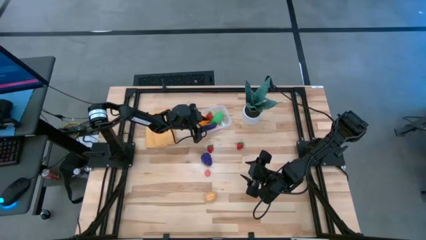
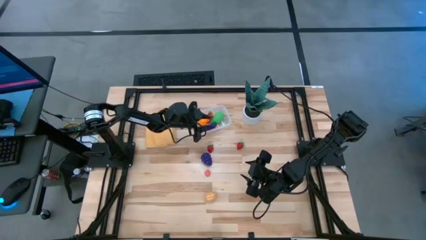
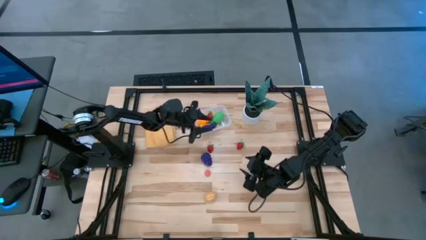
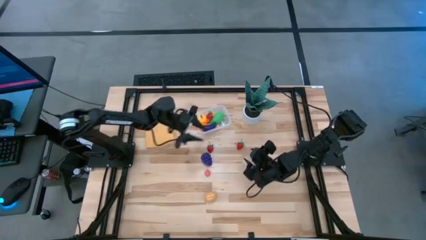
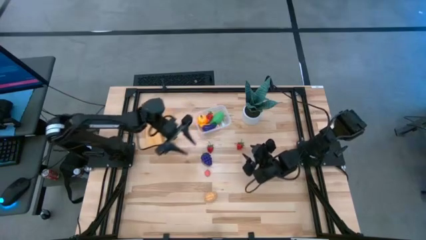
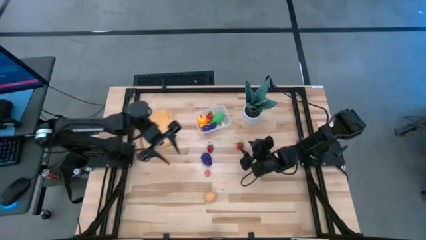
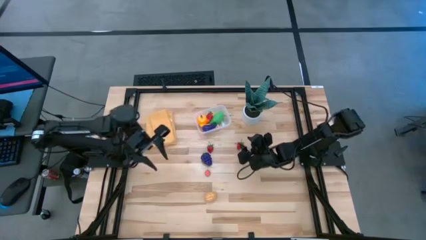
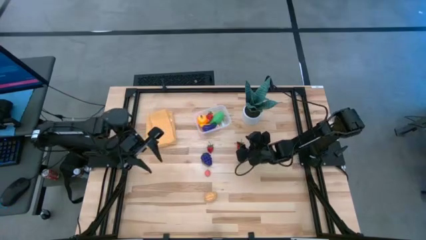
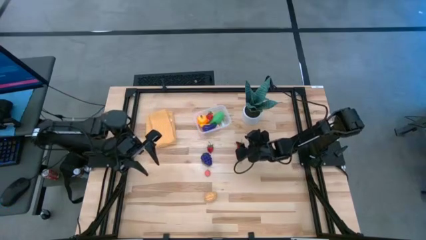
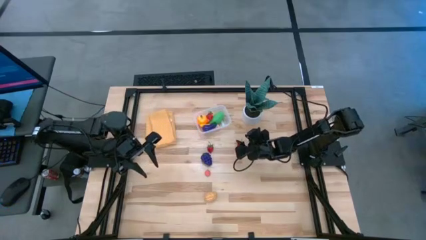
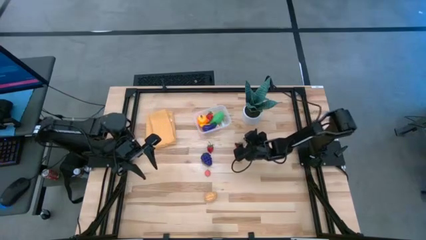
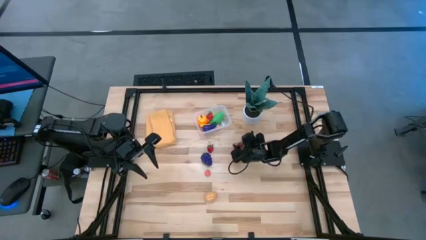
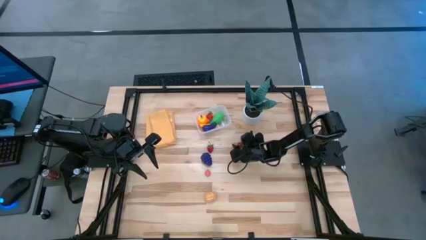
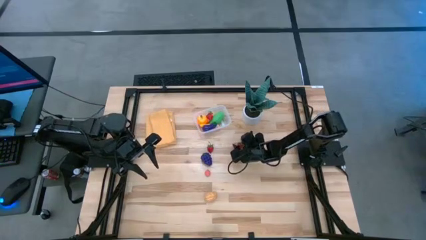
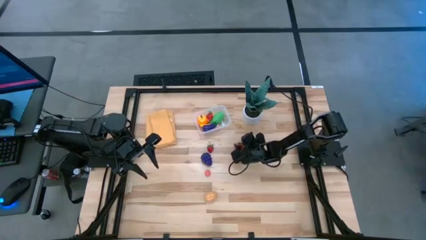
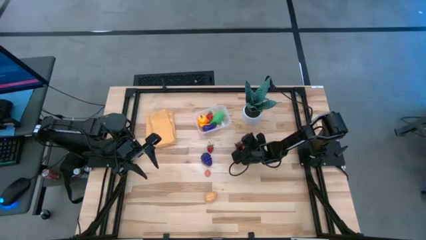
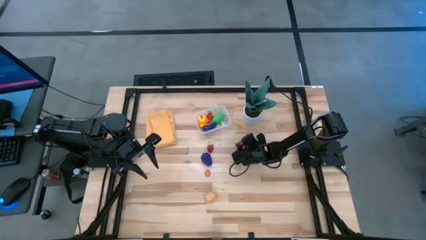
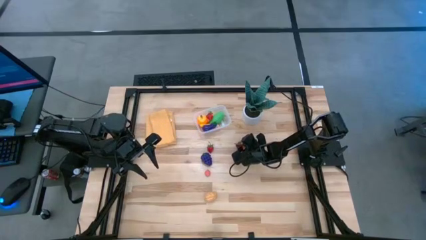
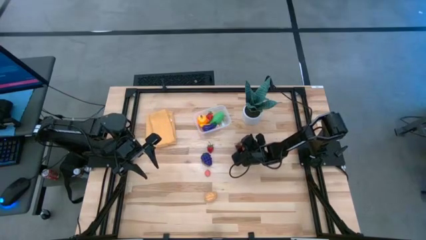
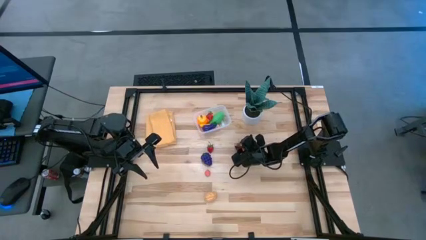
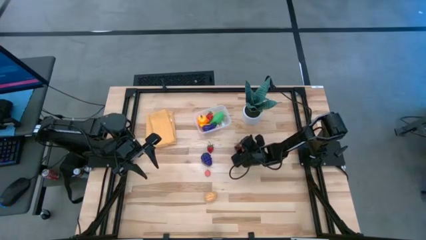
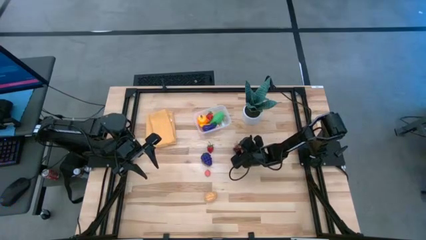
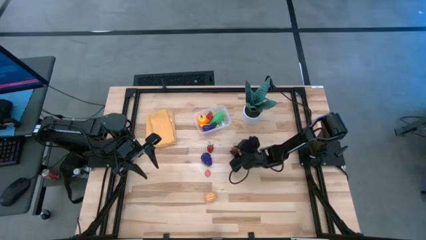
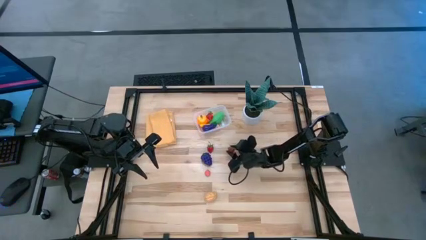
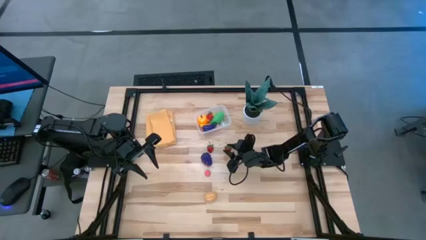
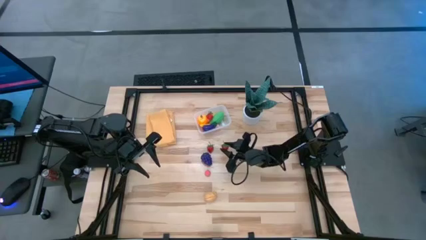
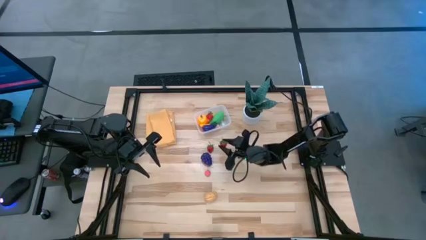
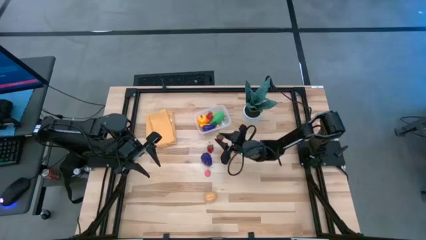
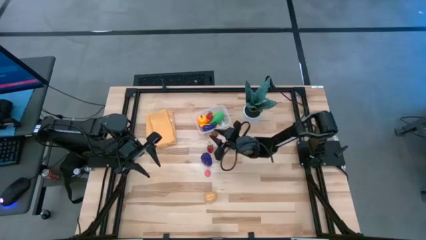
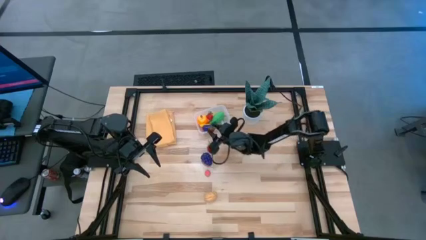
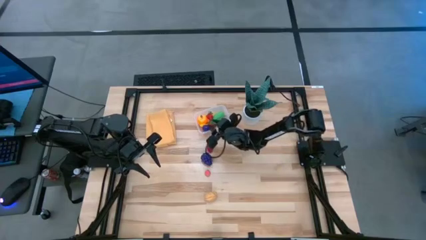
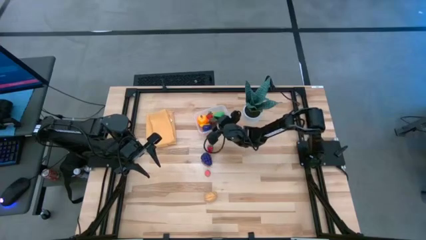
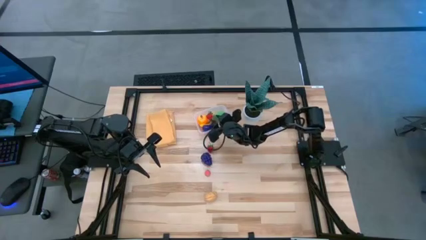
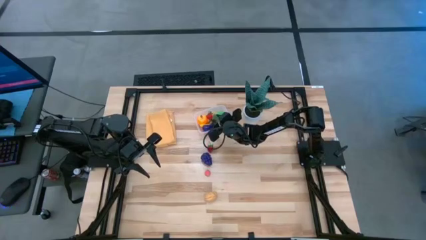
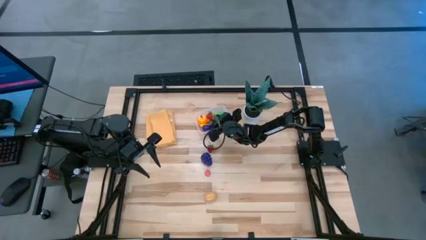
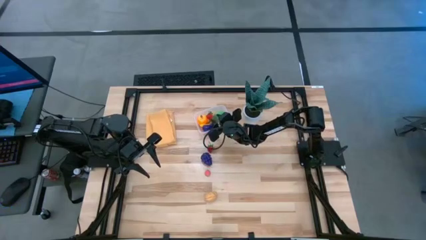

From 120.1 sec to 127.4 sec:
Task: Pick and placing Produce into tupperware
Put the right strawberry into the transparent bin

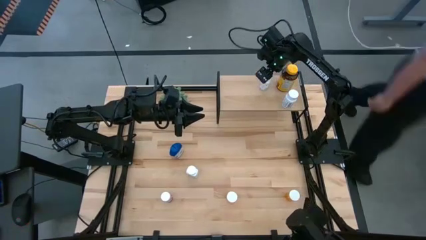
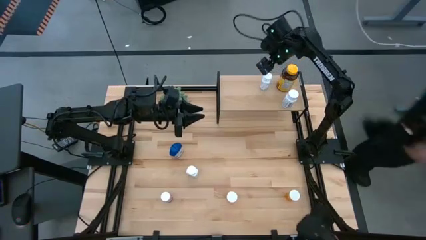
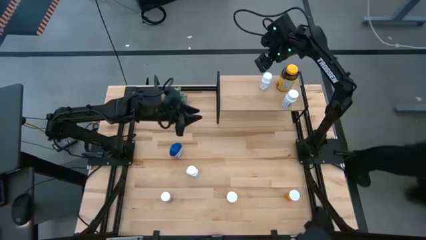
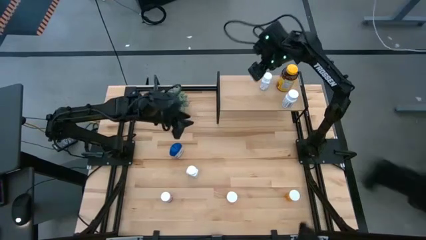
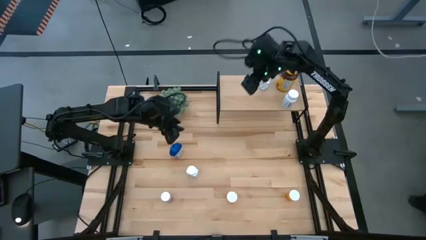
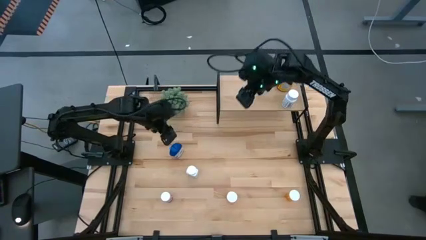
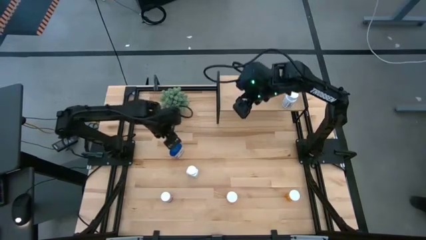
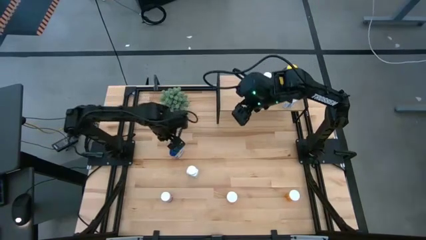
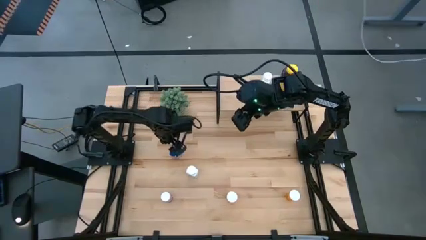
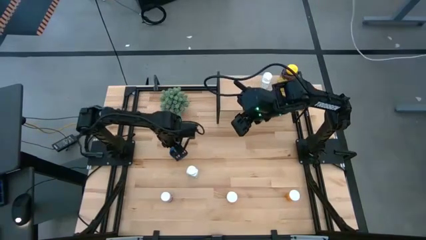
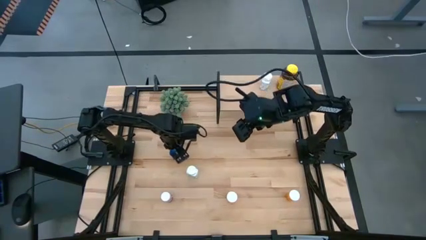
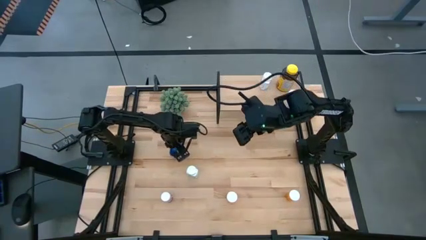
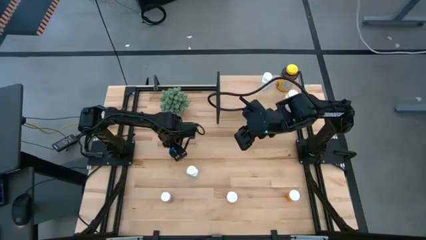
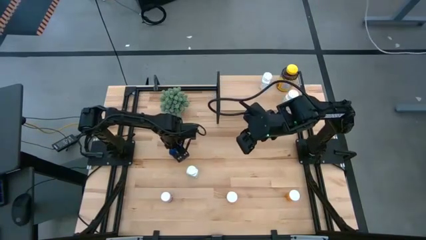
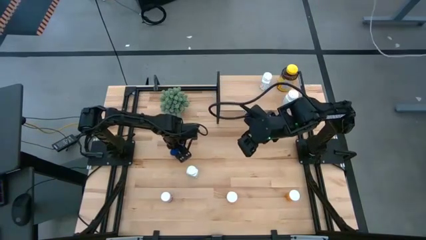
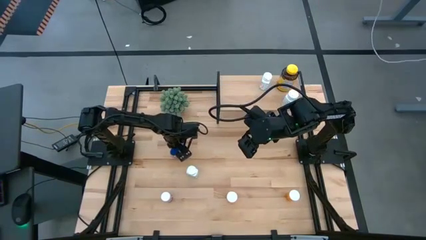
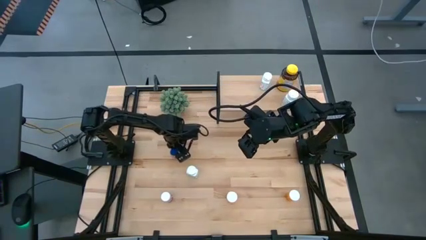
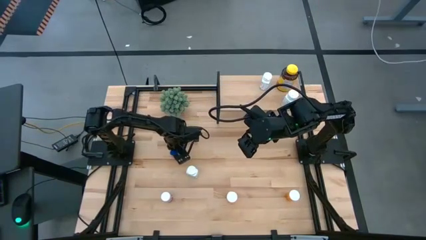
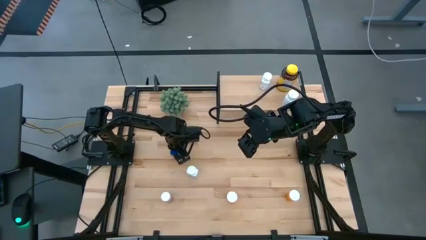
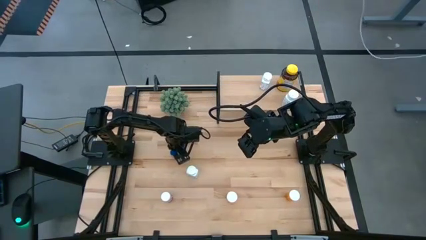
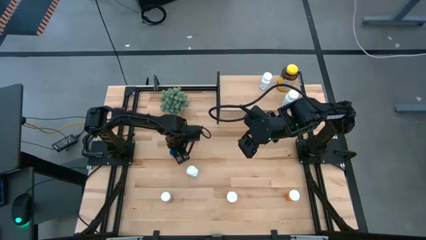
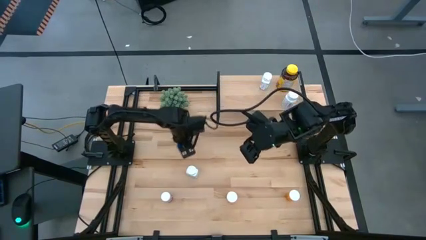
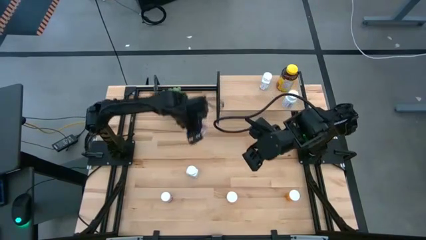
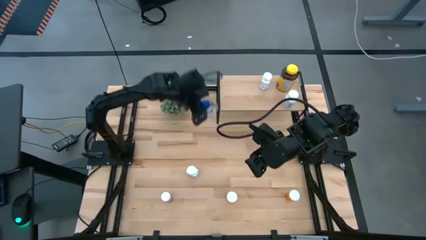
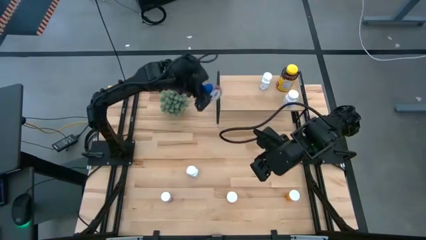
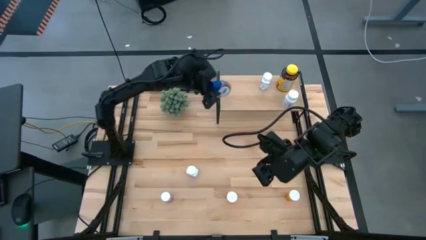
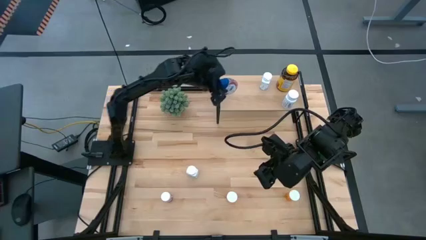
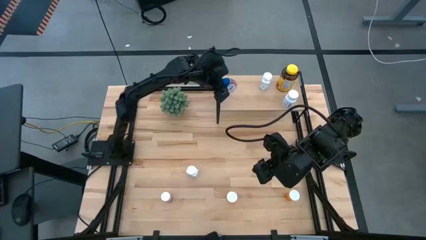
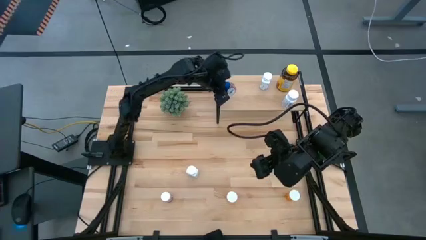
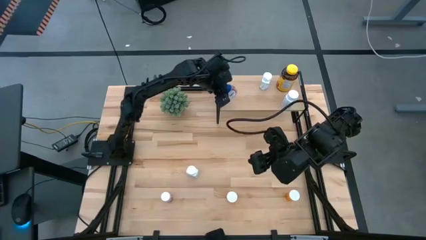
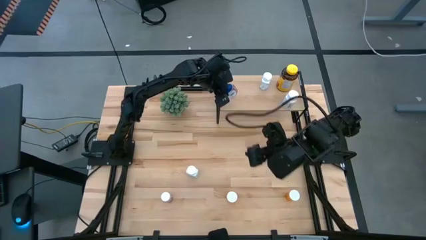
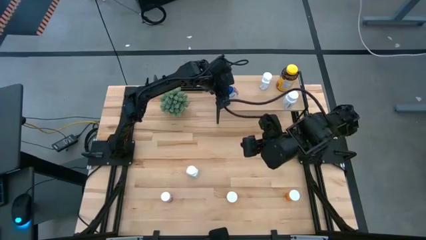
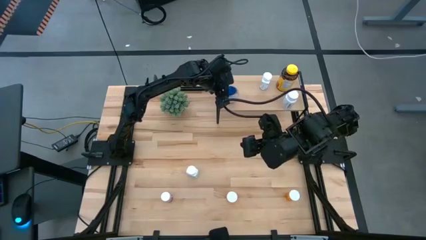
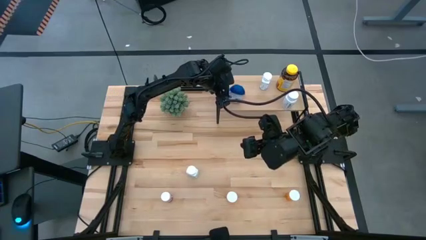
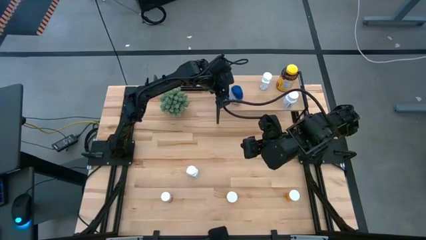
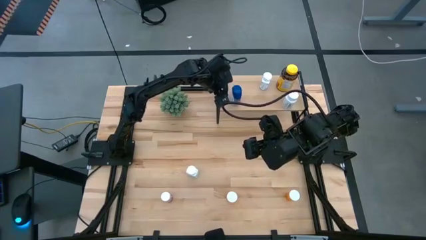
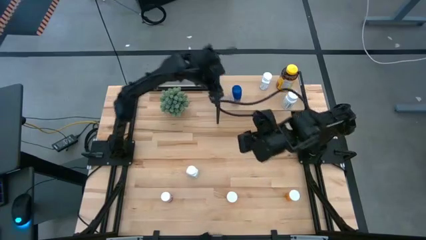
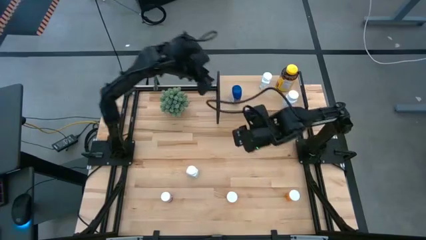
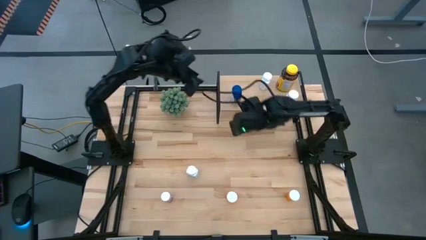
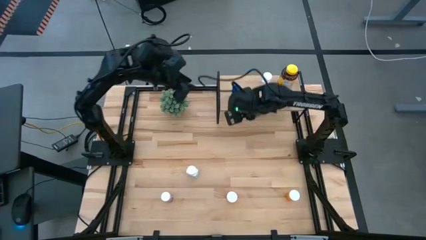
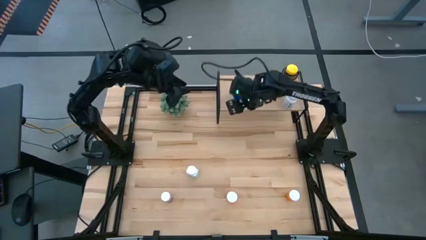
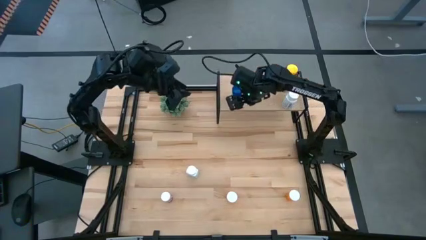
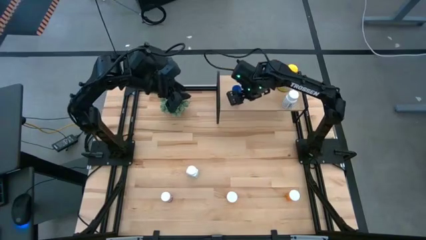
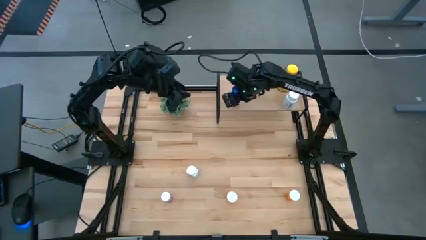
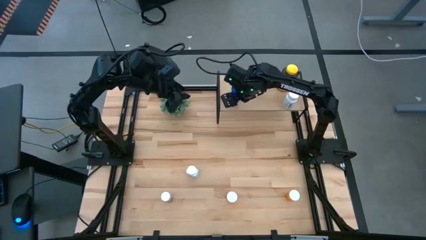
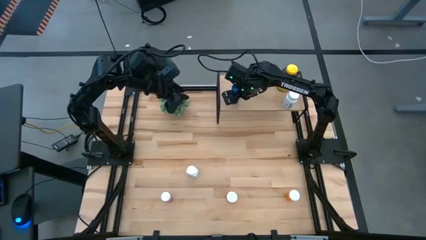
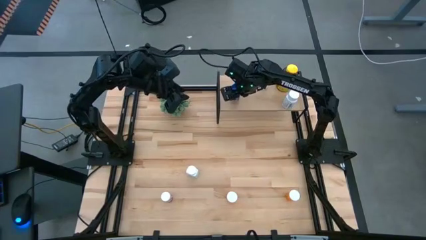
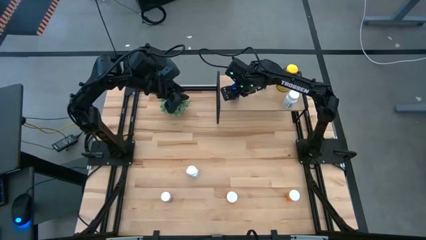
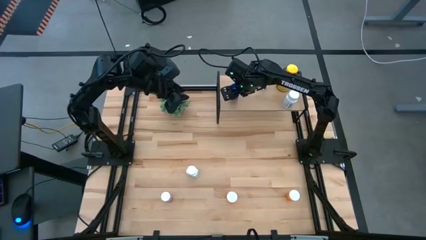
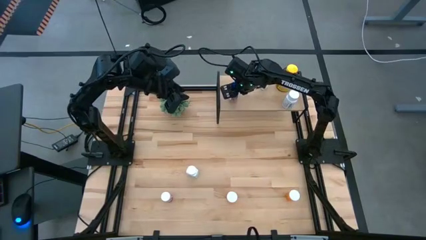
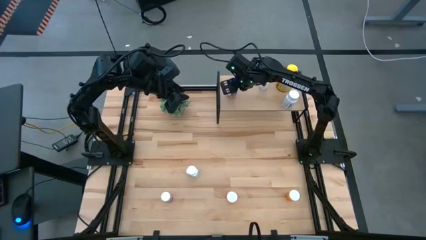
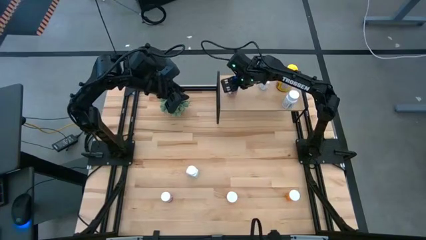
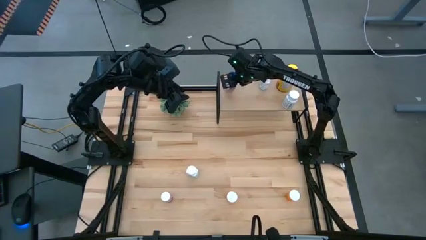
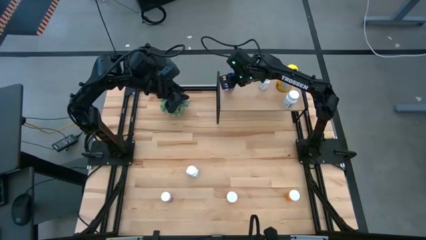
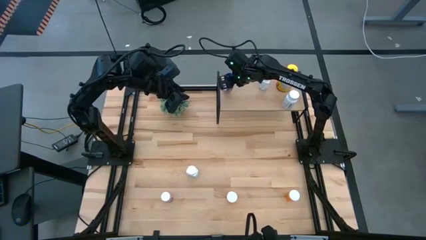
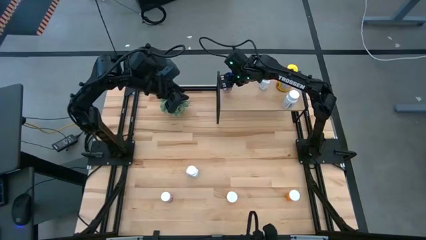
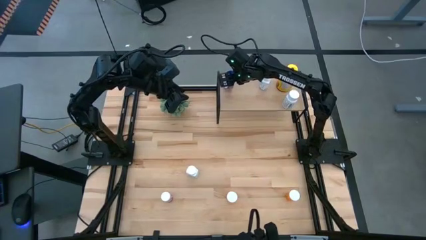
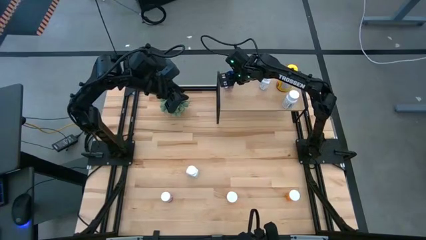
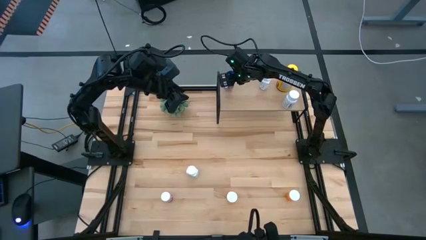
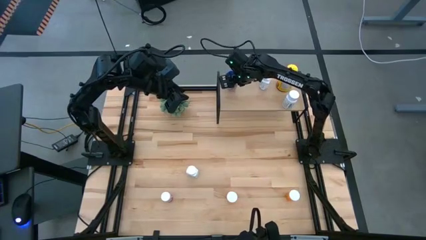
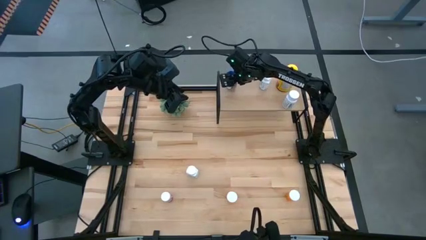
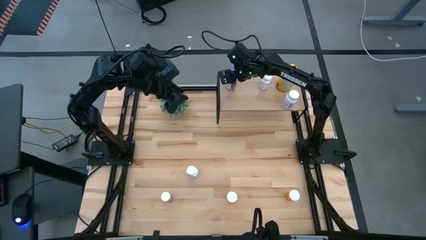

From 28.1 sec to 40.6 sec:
Task: Pick and place medicine bottles onto shelf by color
Put the blue medicine bottle on the shelf
